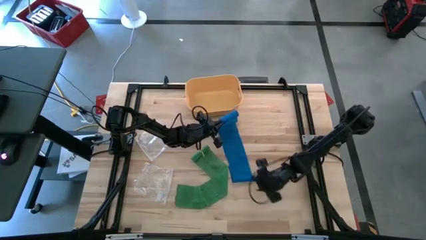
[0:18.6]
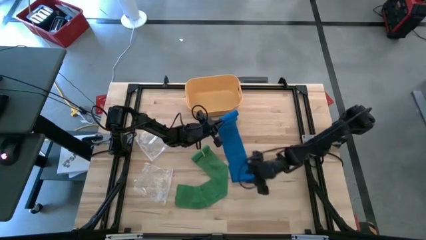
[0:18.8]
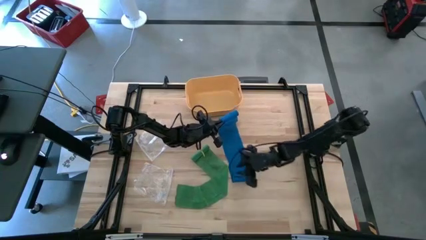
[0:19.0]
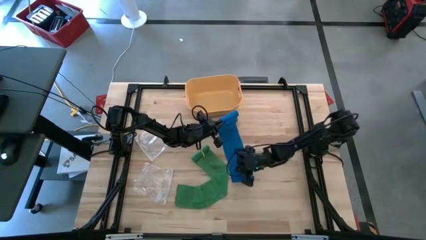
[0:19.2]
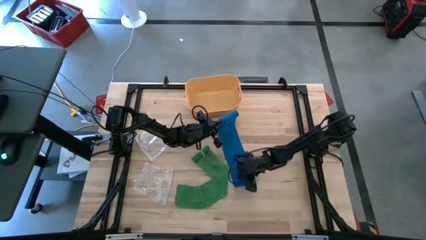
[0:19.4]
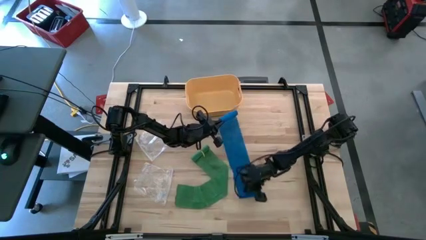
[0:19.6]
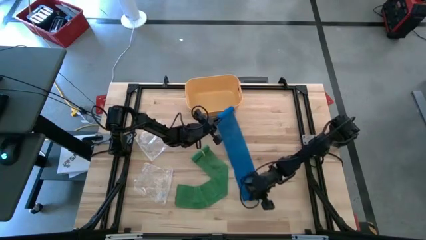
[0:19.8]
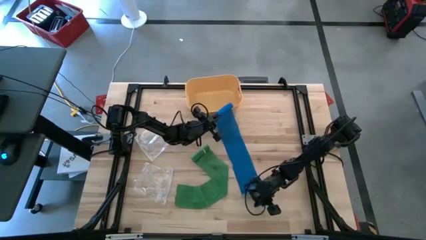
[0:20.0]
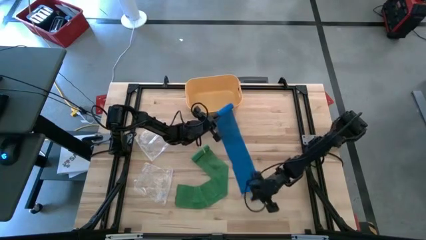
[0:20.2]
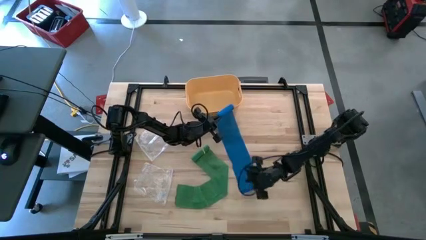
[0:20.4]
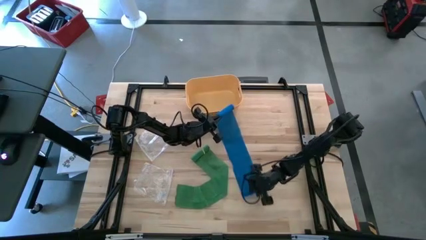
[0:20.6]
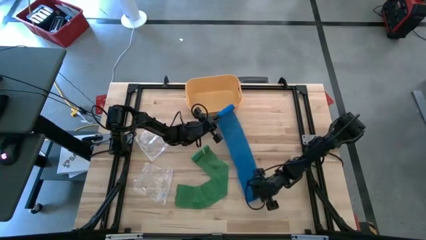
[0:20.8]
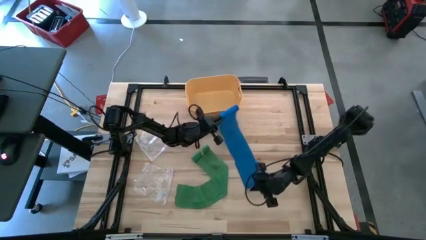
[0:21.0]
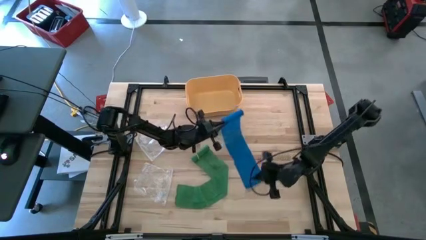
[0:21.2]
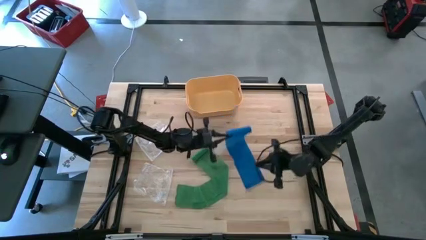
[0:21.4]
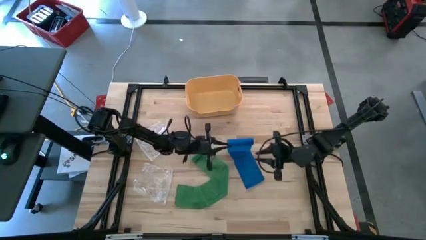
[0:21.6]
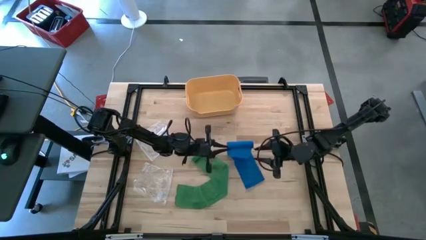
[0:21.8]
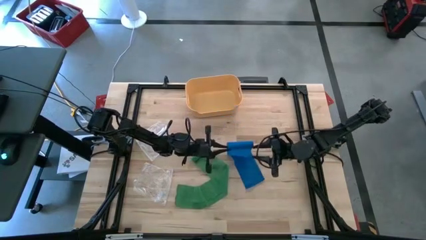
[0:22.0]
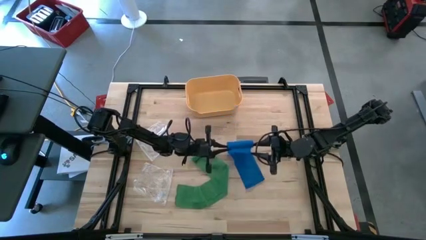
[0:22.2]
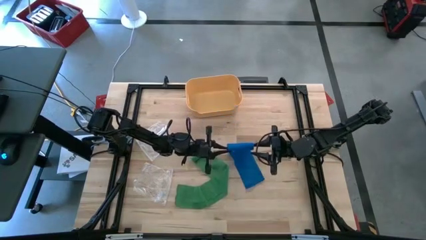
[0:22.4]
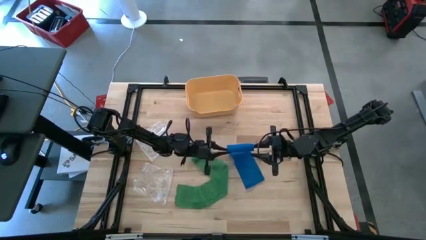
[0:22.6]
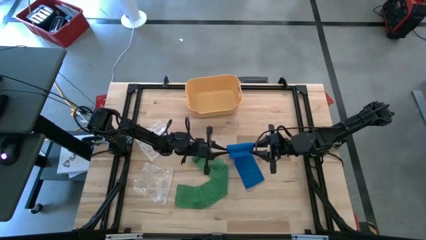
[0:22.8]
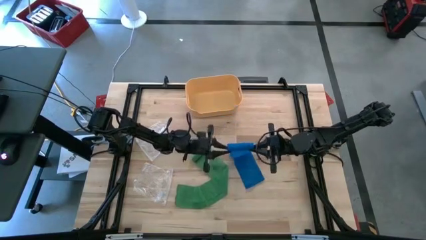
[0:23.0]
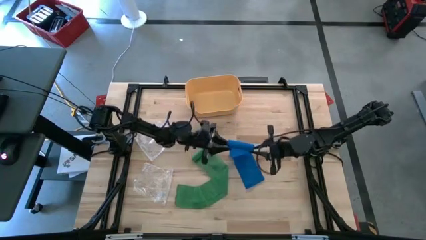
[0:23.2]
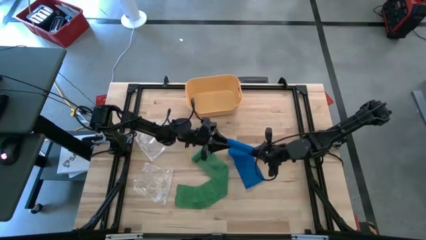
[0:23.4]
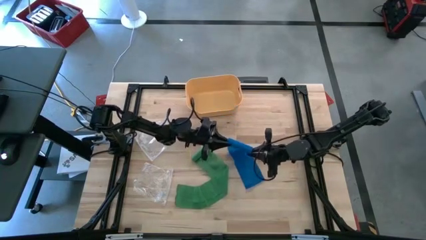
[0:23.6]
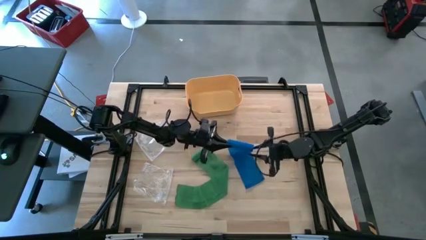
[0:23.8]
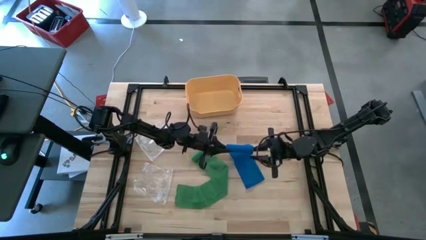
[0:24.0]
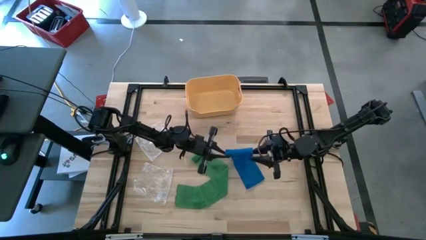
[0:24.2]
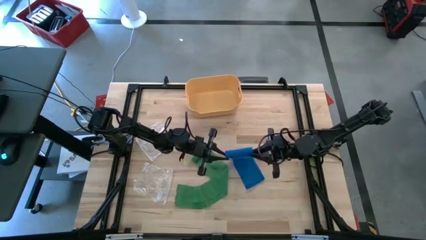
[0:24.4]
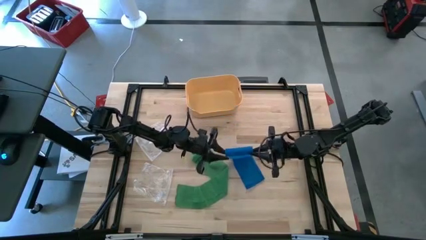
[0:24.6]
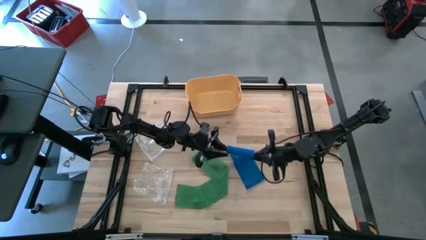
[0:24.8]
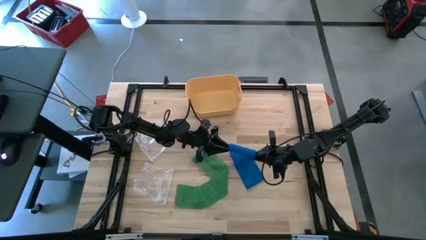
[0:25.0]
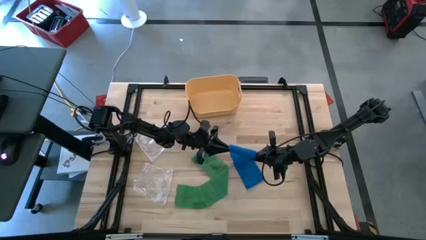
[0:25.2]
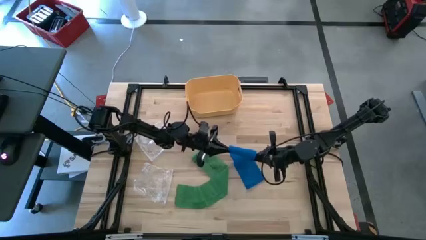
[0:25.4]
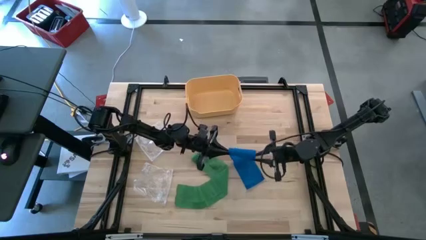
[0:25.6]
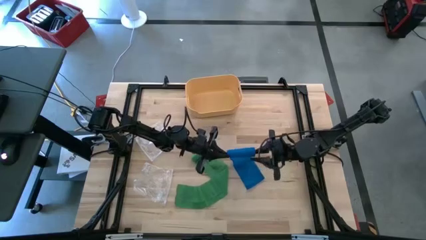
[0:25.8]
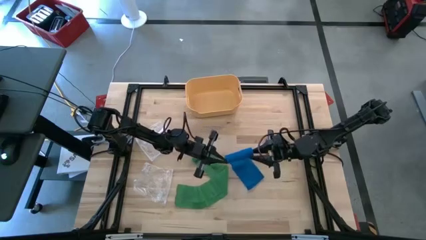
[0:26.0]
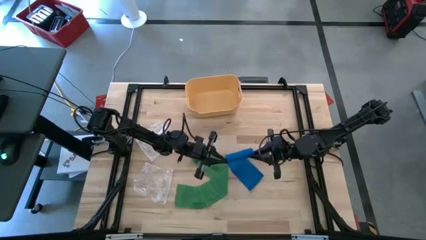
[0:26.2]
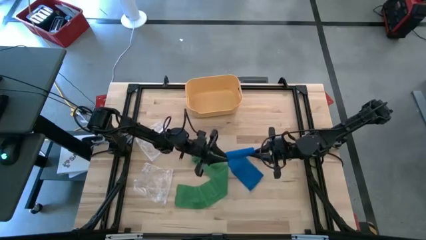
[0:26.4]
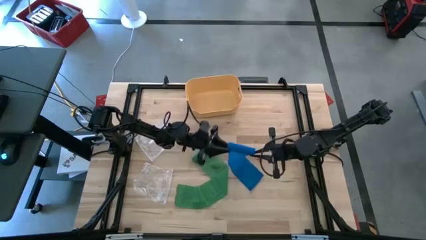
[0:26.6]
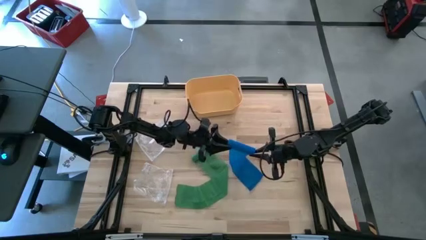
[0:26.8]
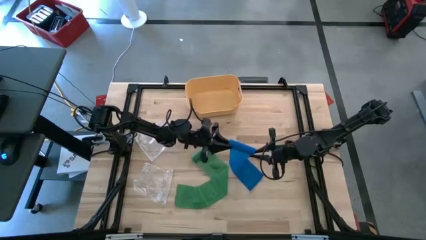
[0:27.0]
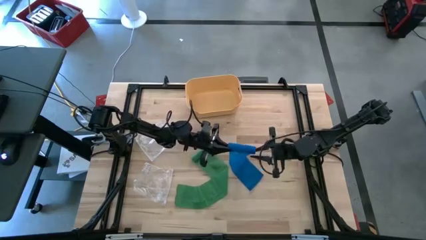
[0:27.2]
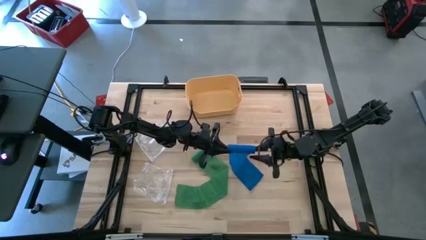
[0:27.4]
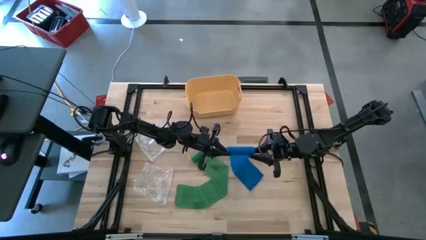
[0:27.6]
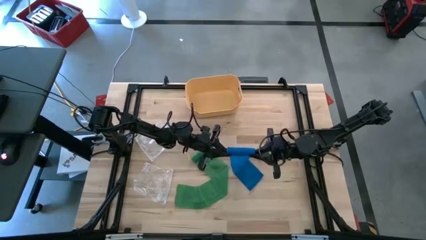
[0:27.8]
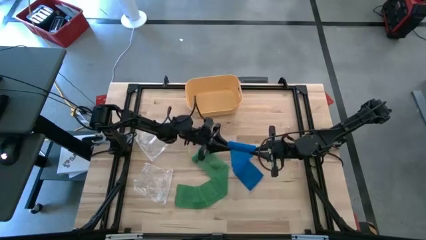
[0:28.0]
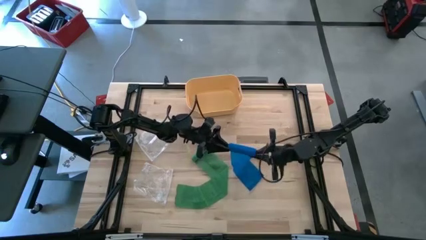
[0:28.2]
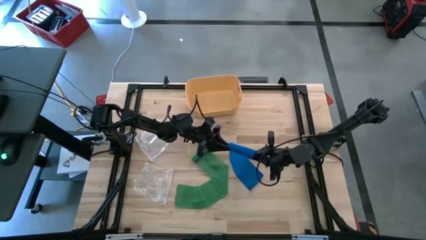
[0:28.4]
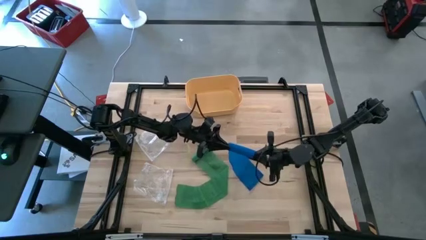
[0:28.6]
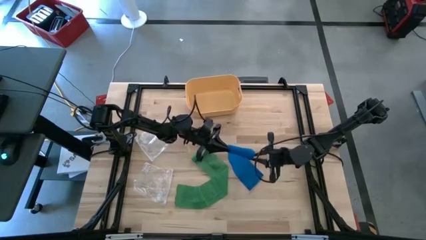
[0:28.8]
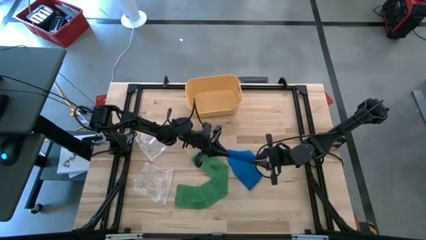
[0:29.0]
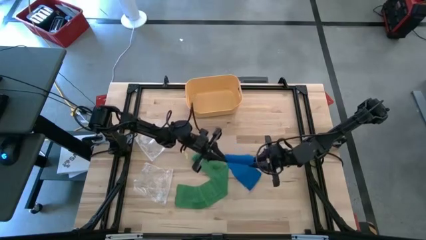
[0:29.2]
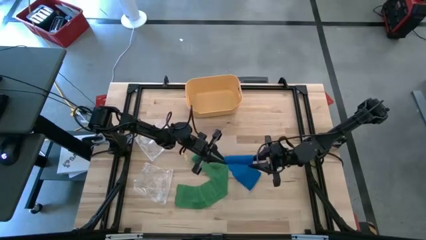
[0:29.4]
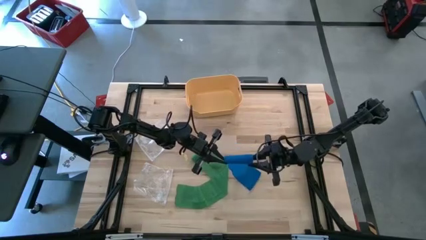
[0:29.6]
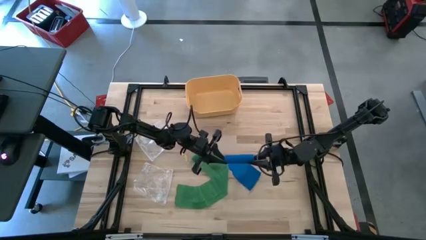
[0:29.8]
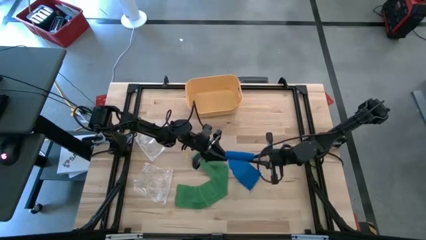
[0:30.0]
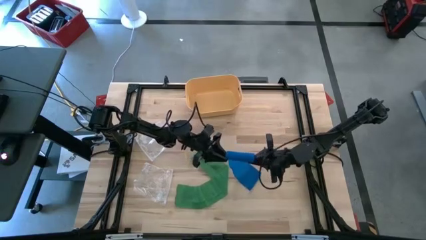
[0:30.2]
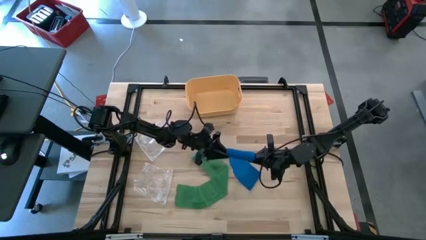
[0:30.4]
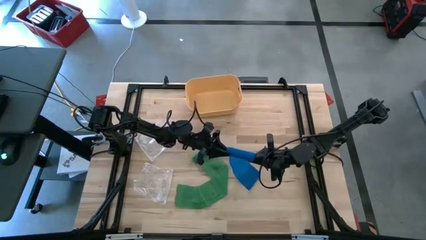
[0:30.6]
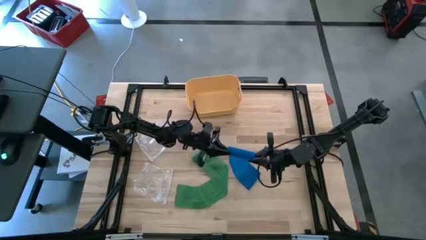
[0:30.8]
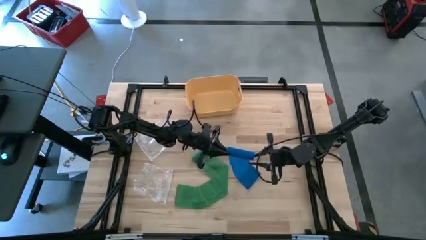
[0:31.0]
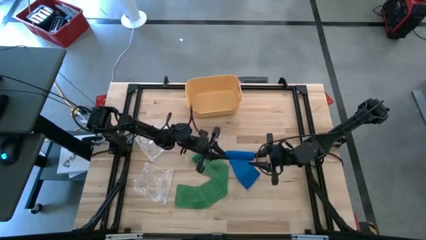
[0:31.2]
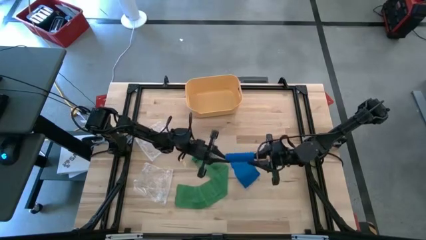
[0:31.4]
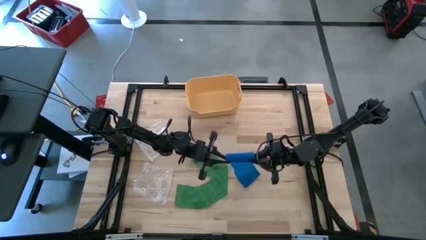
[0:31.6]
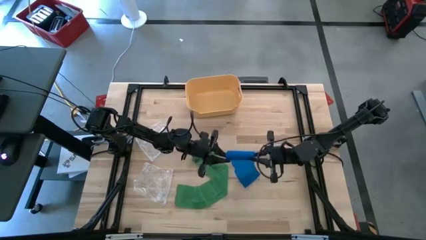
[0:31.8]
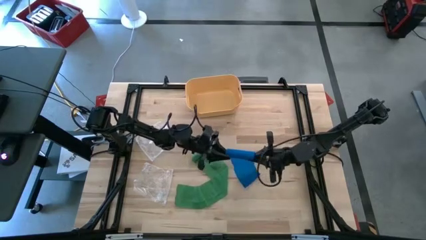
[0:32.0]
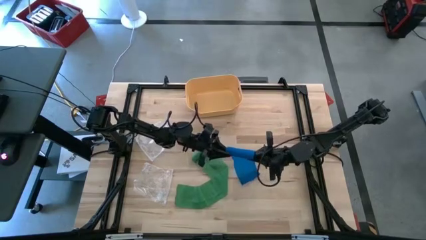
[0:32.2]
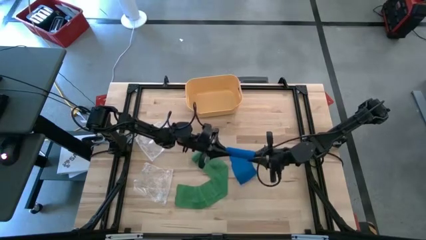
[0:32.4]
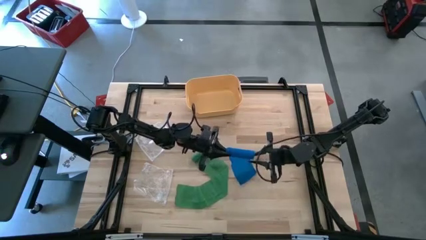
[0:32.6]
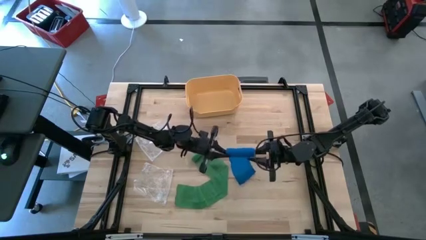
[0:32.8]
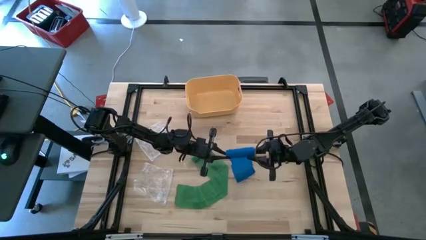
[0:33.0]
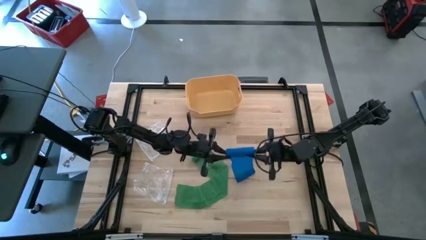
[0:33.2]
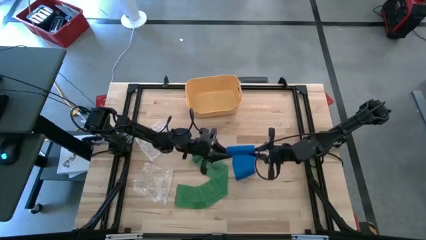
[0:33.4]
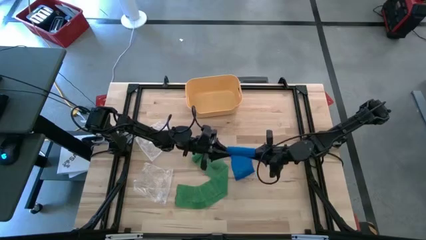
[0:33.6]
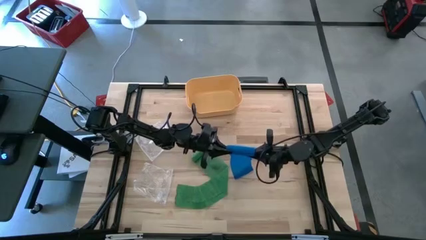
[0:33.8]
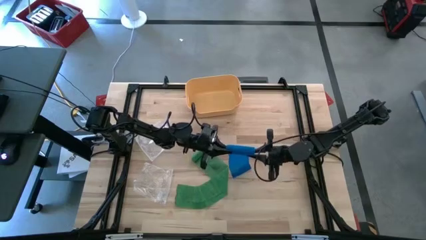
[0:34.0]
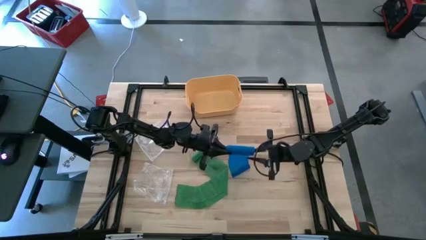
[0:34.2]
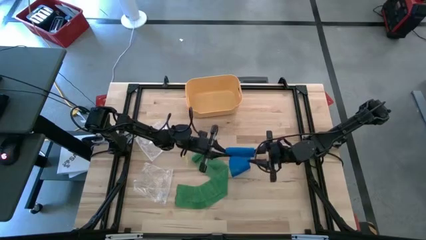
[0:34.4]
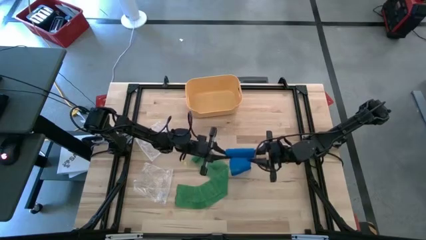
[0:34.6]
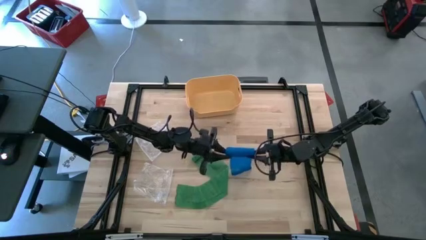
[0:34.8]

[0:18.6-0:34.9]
Task: Roll bandage
Roll the blue bandage
